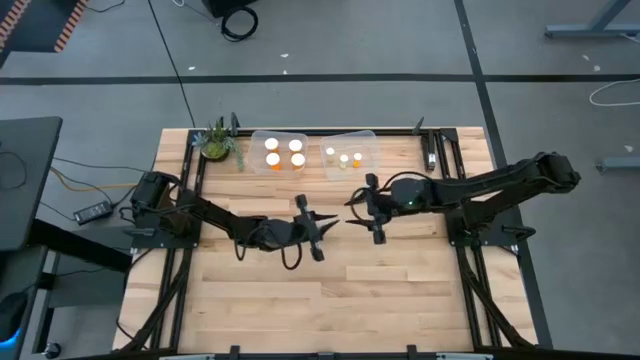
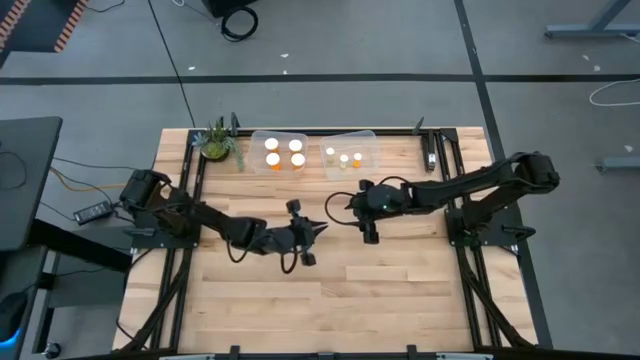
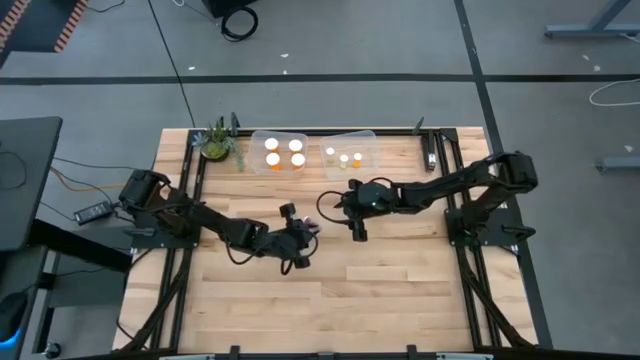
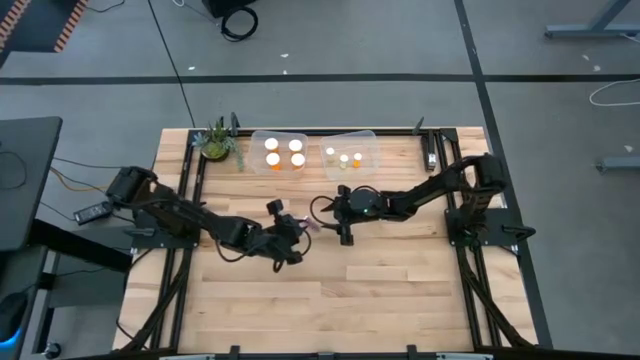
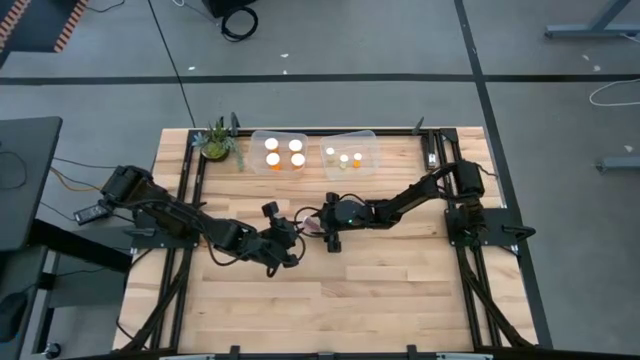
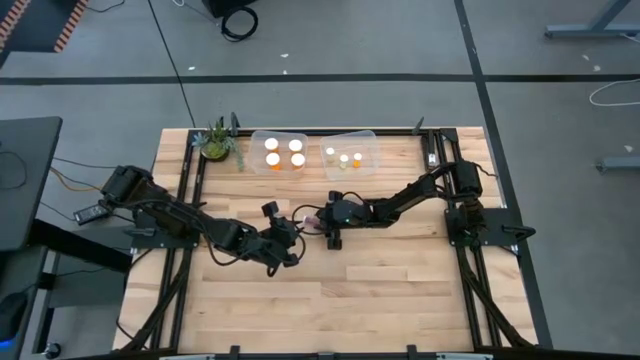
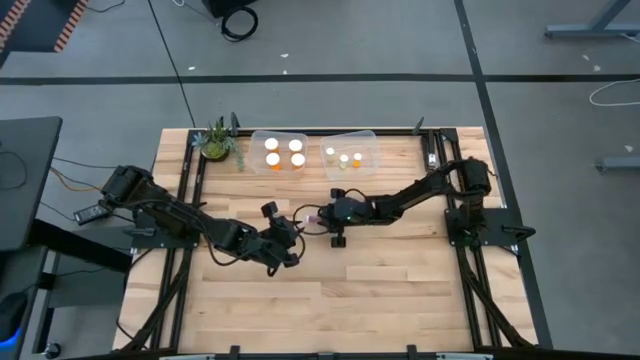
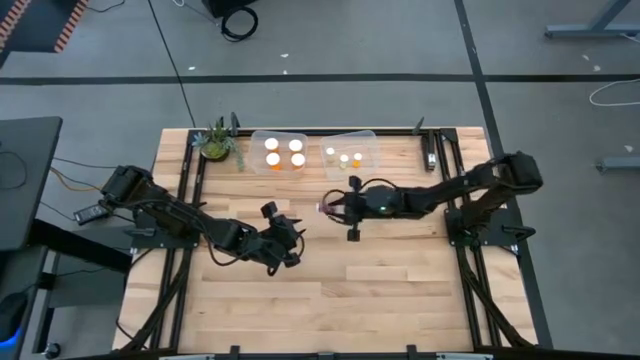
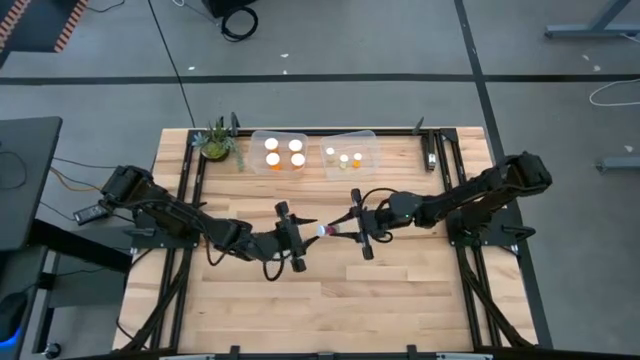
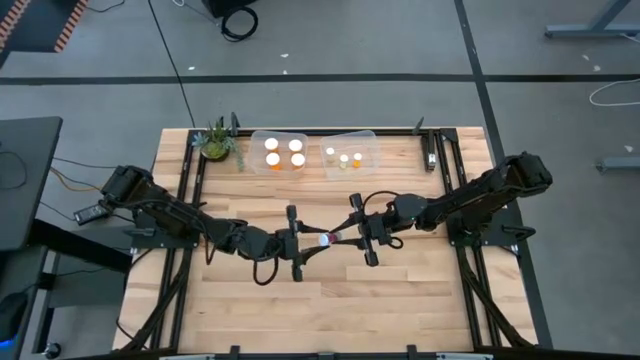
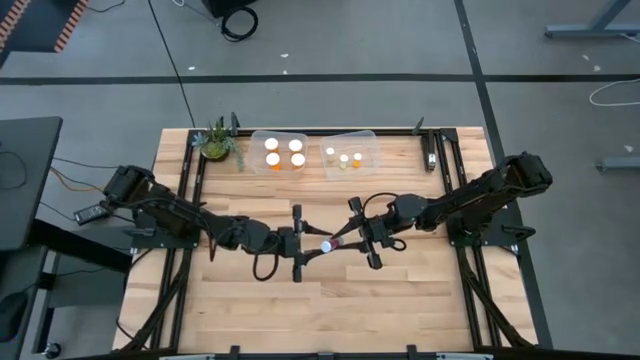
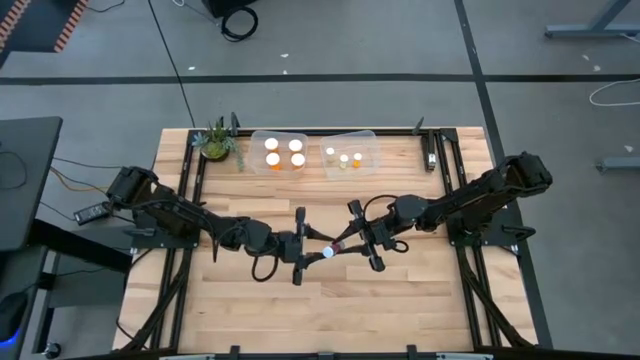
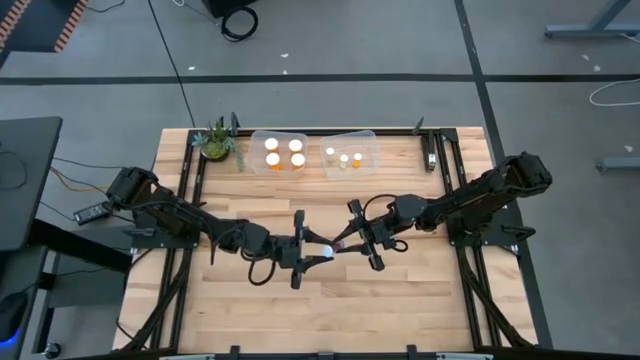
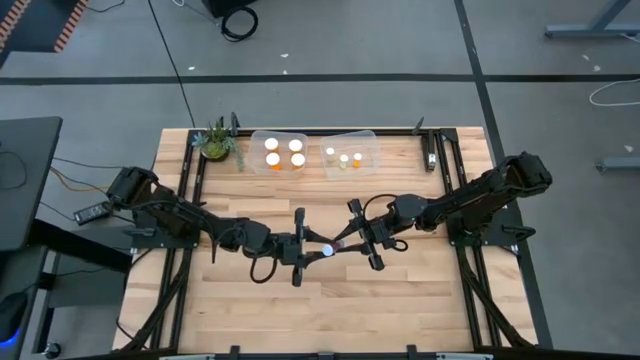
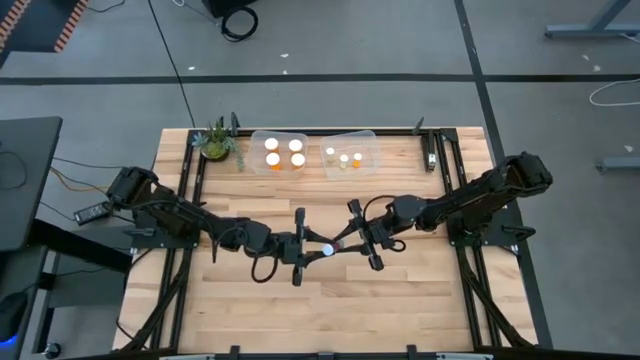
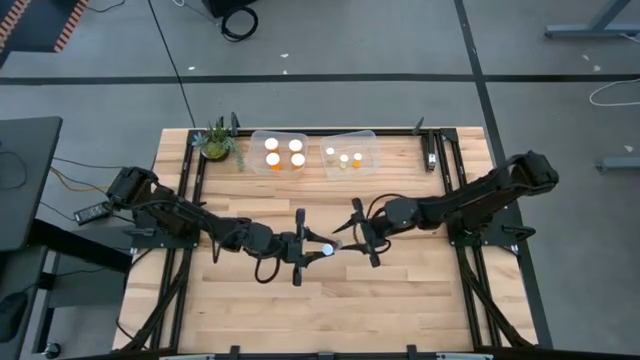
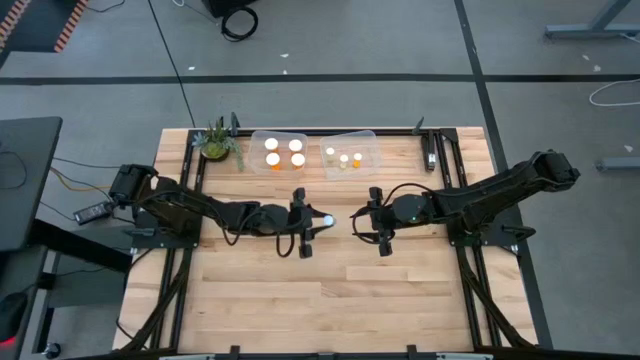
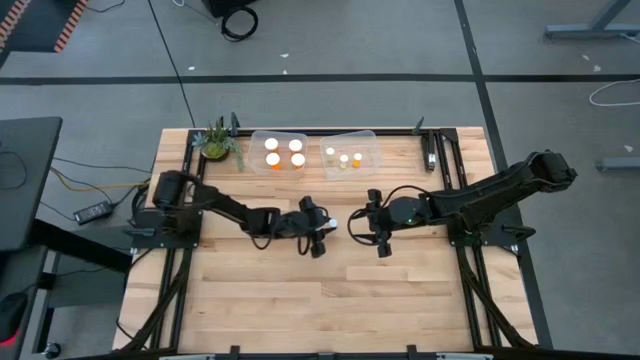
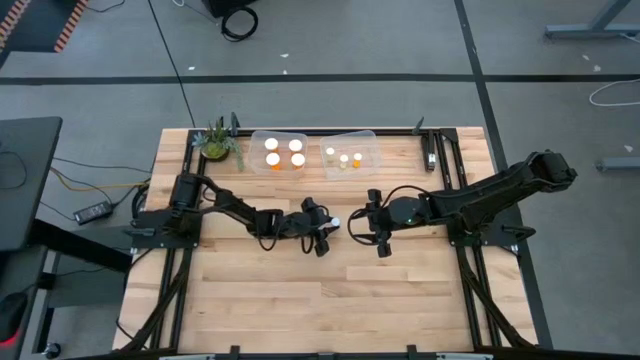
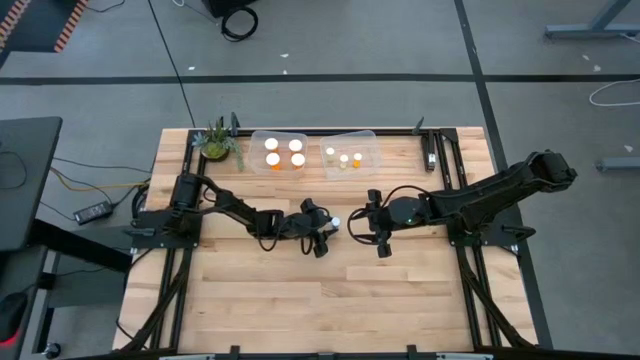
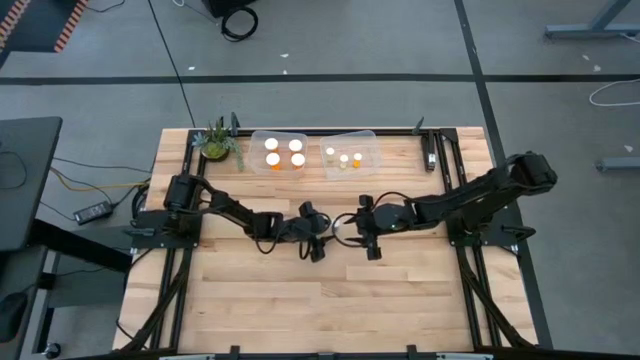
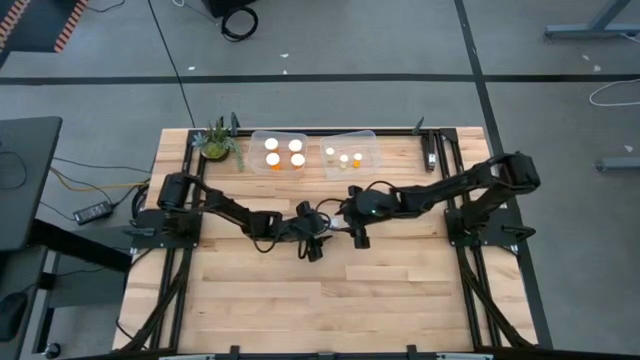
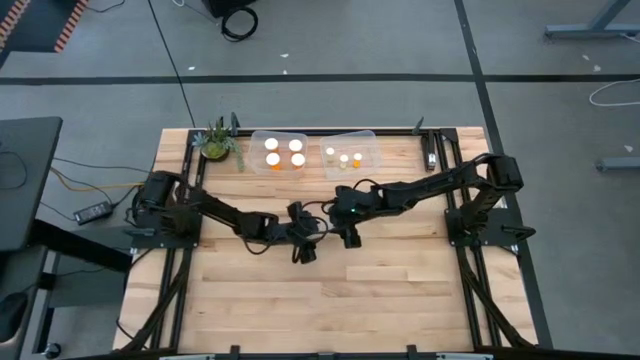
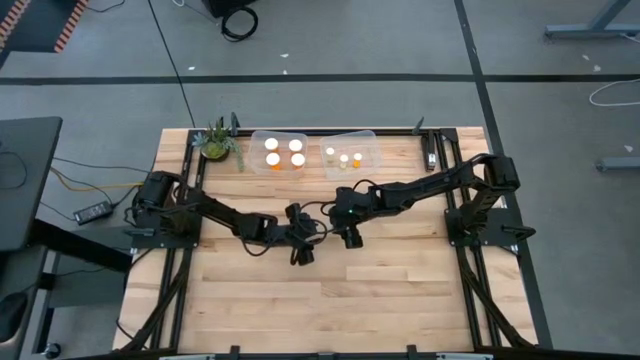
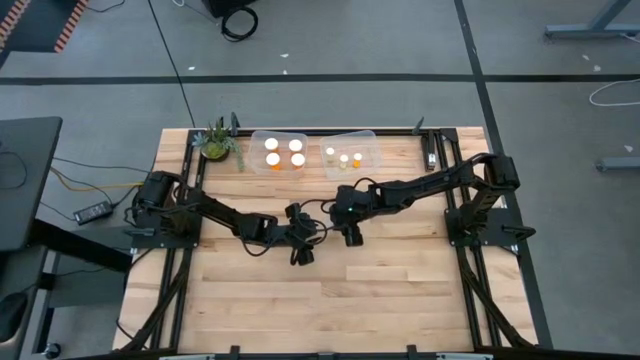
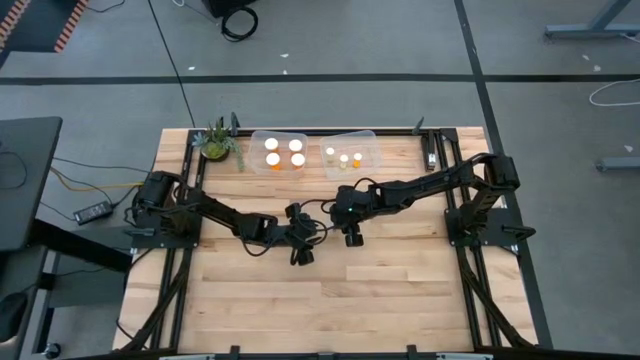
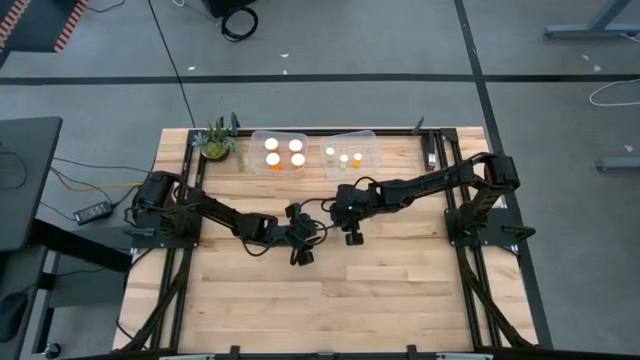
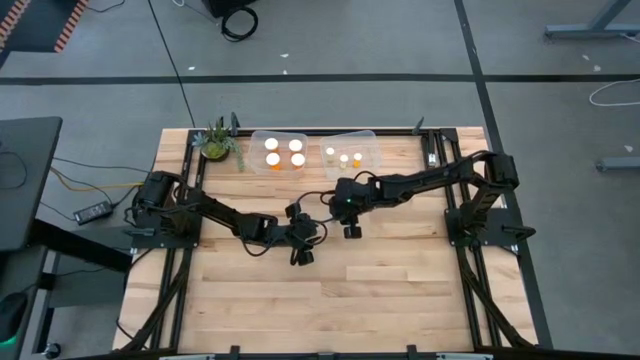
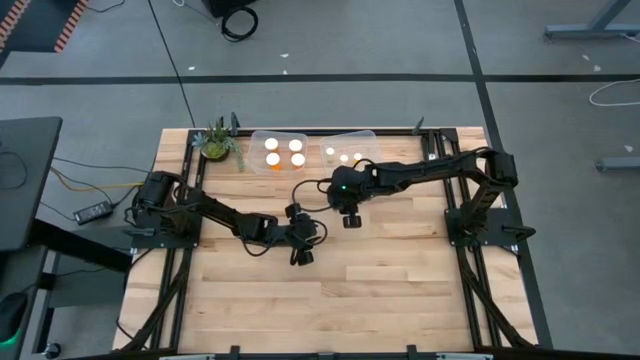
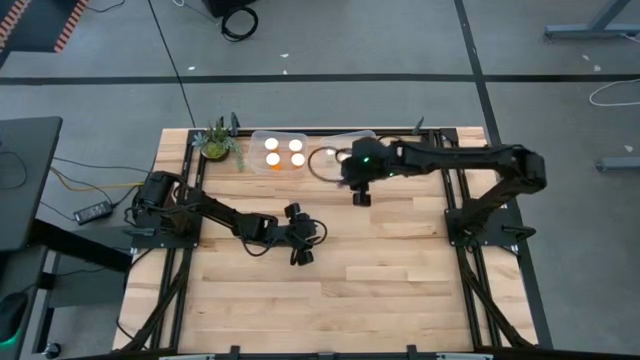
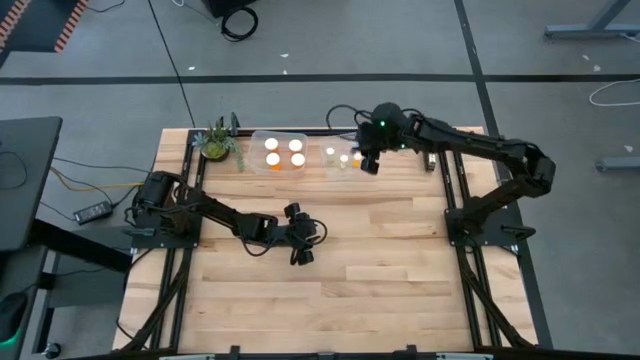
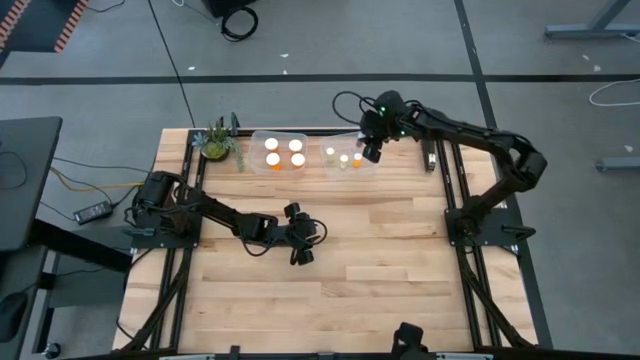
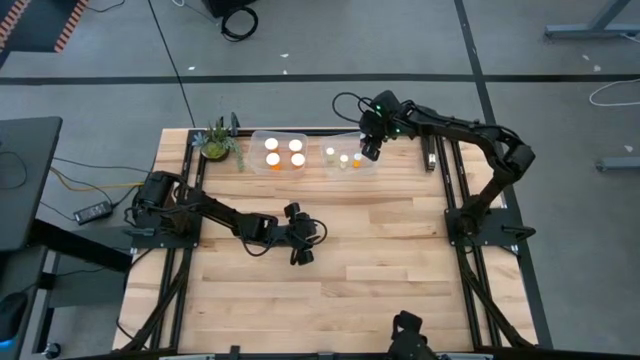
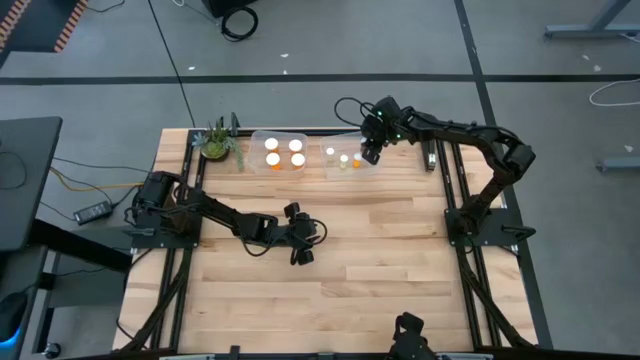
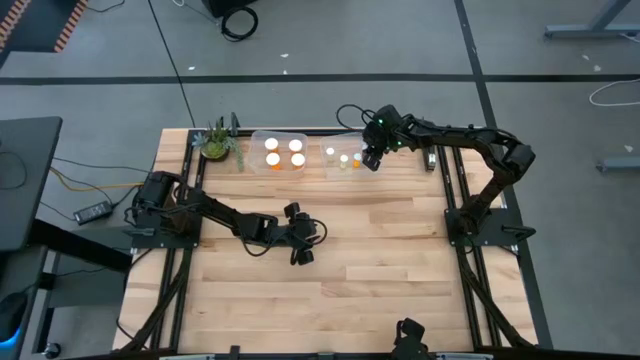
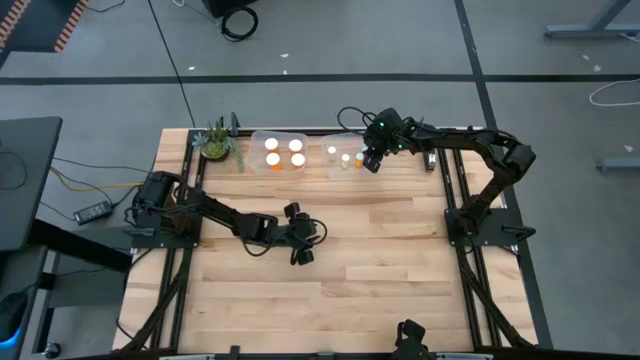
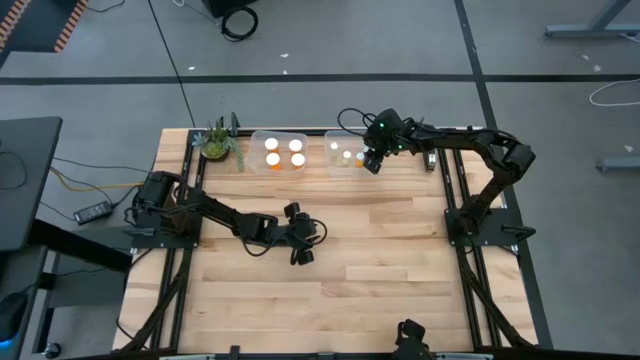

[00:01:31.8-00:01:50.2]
Task: Pick and place medicine bottles into bin by pill shape (circle, oval)
Put the small blue pill bottle into the right bin

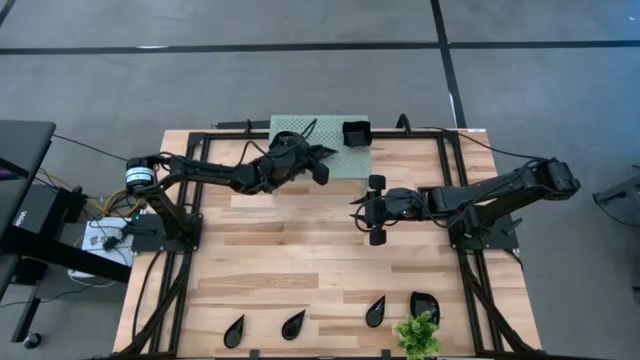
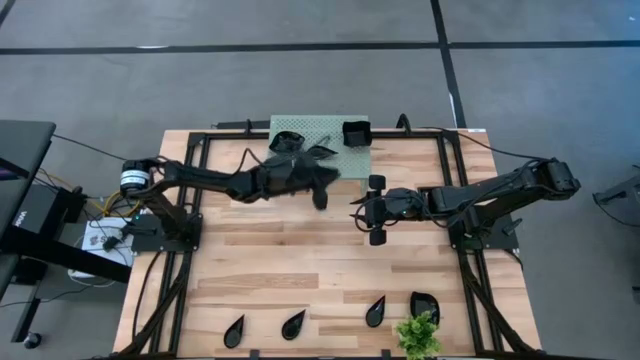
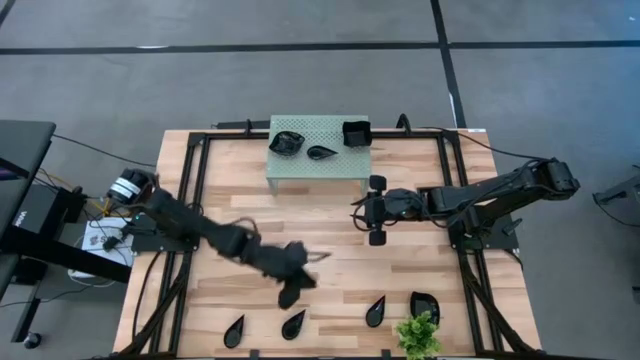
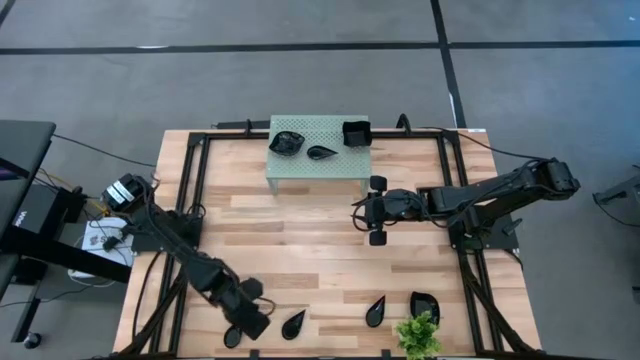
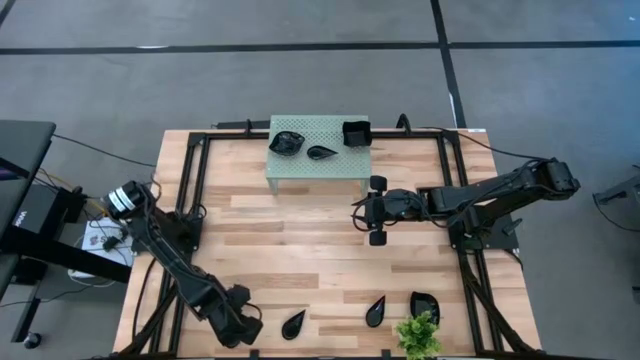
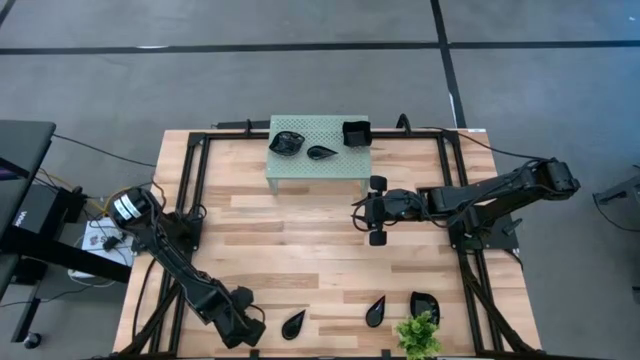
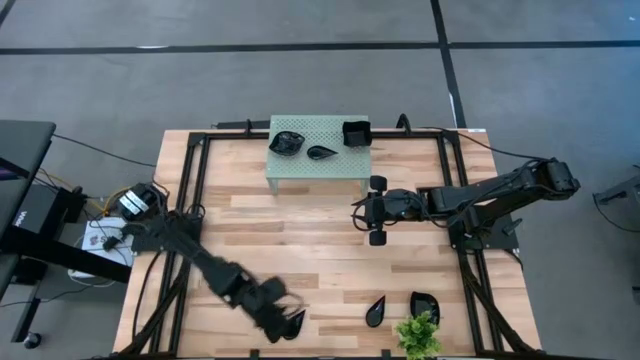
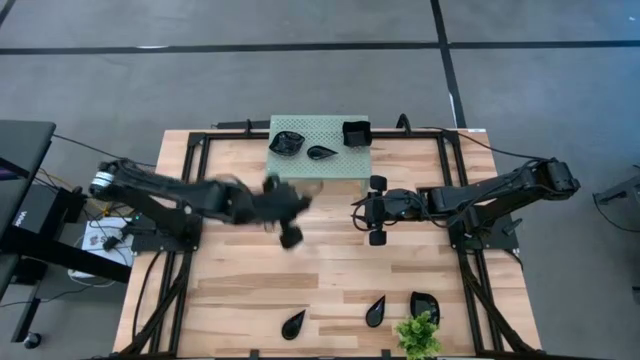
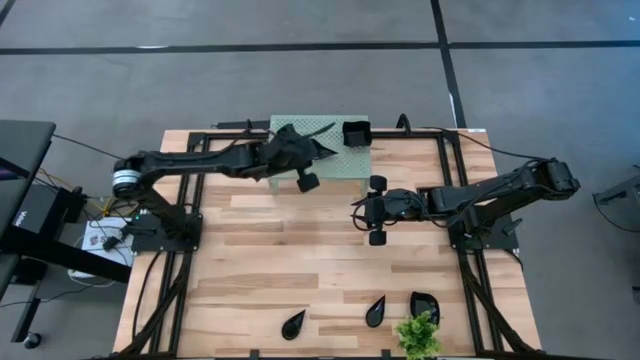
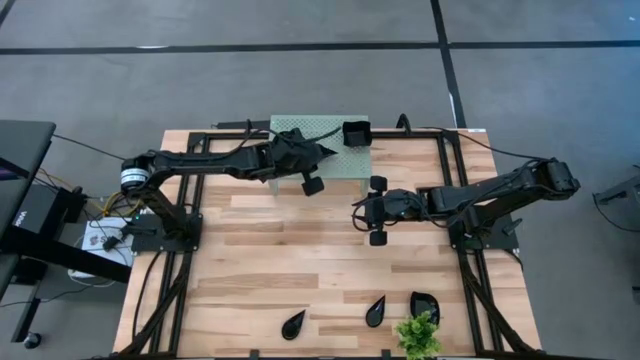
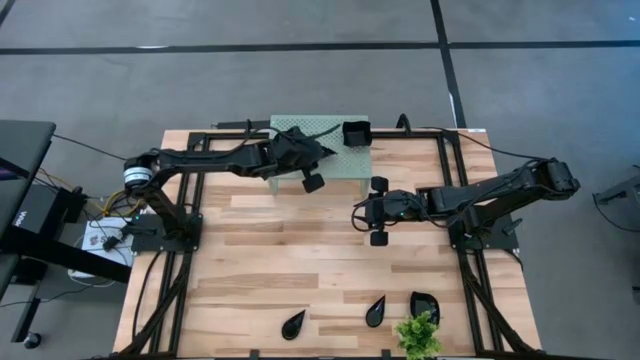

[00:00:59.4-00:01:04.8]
Task: Pick & Place Mini shaped plates
Stack the drop-shaped plate on top of the other drop-shaped plate on the shelf
